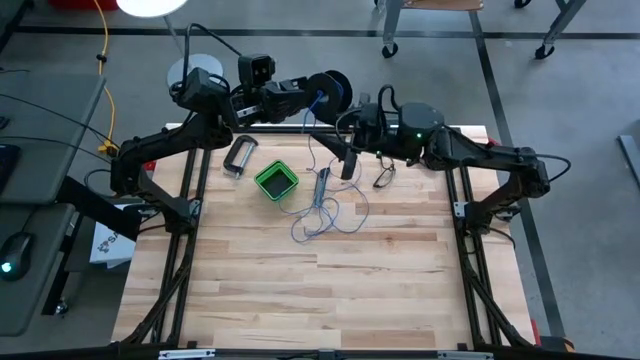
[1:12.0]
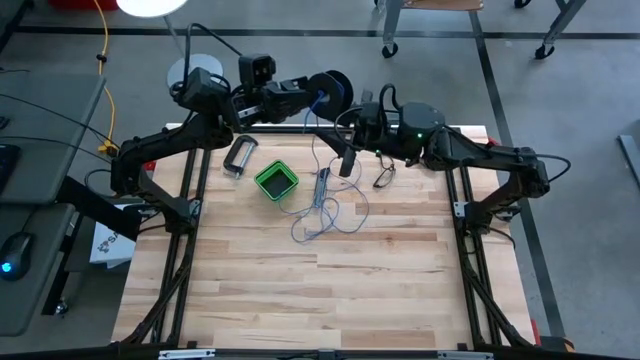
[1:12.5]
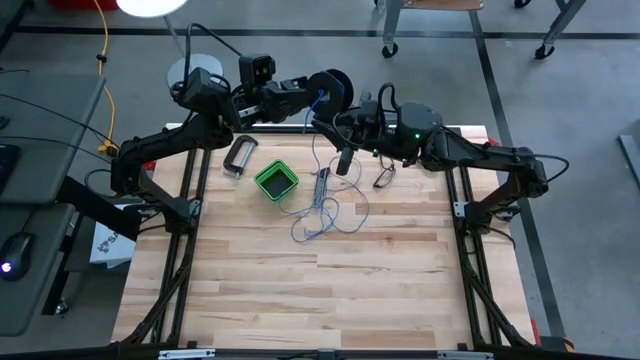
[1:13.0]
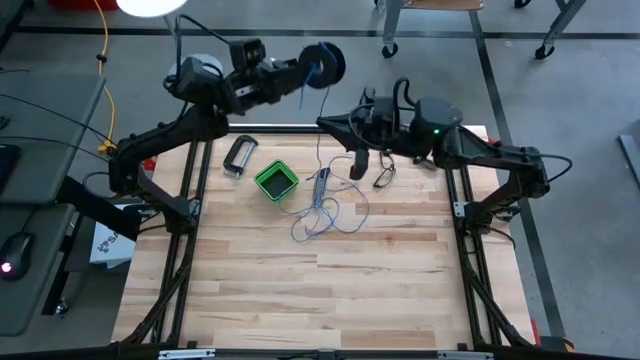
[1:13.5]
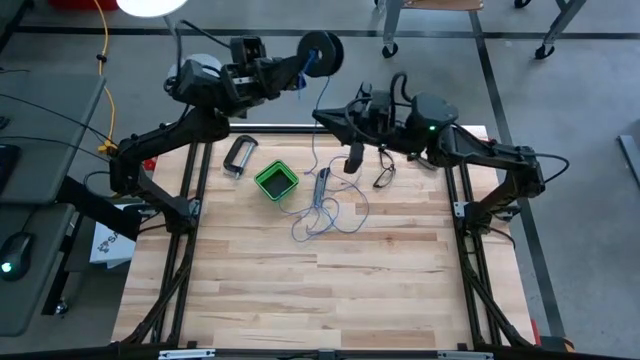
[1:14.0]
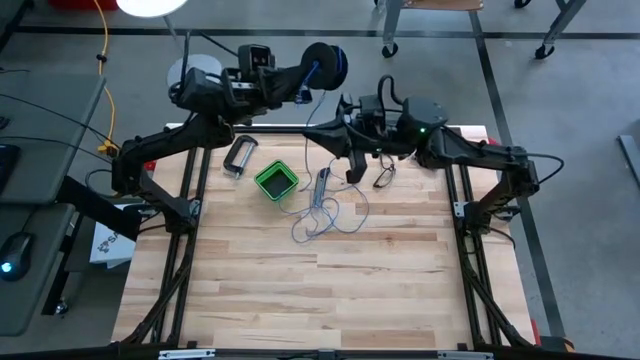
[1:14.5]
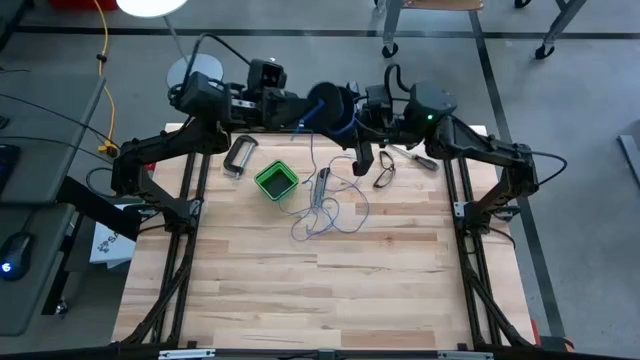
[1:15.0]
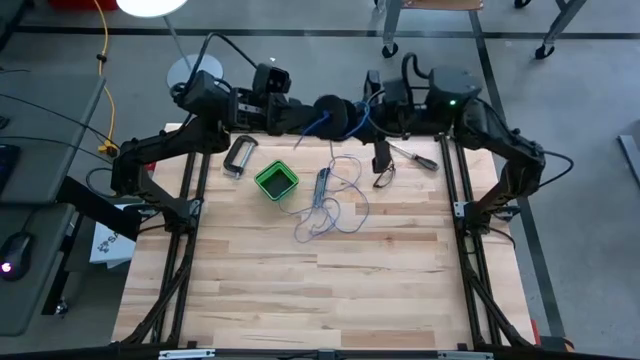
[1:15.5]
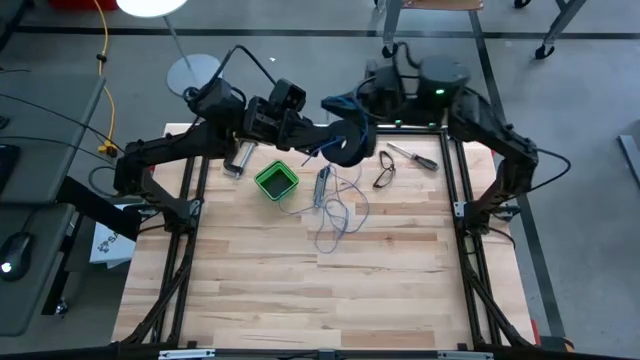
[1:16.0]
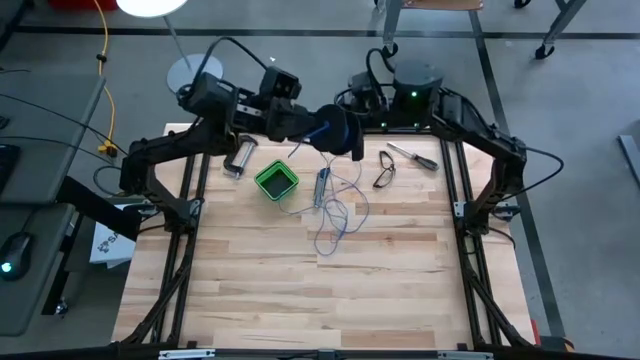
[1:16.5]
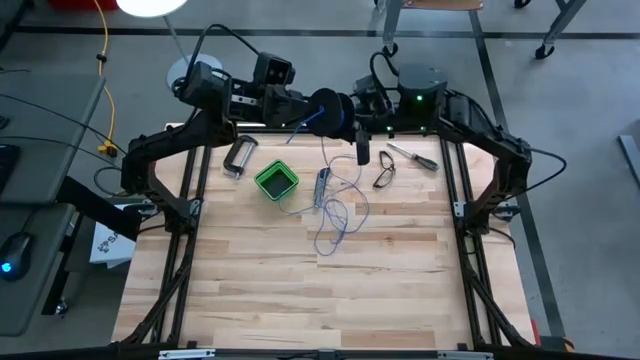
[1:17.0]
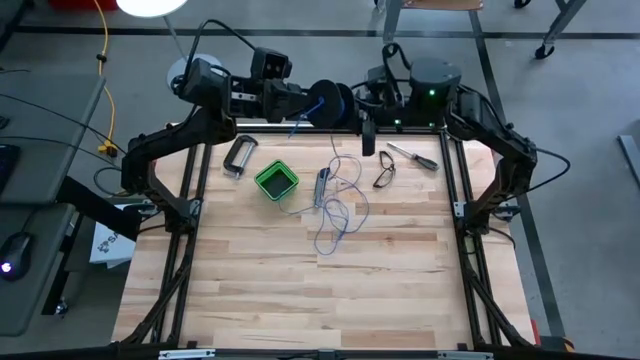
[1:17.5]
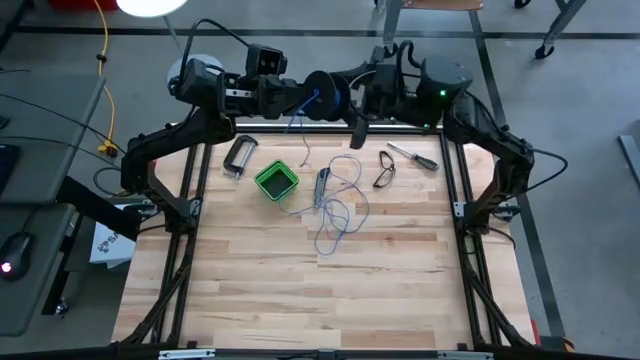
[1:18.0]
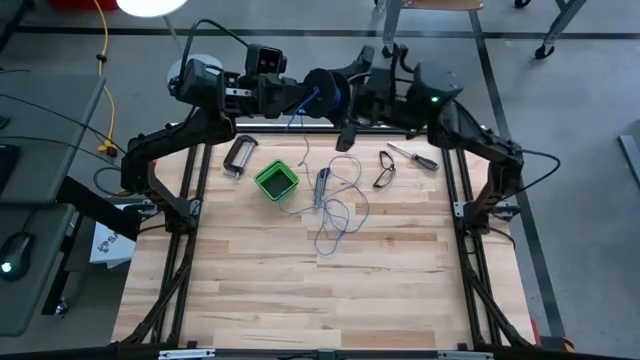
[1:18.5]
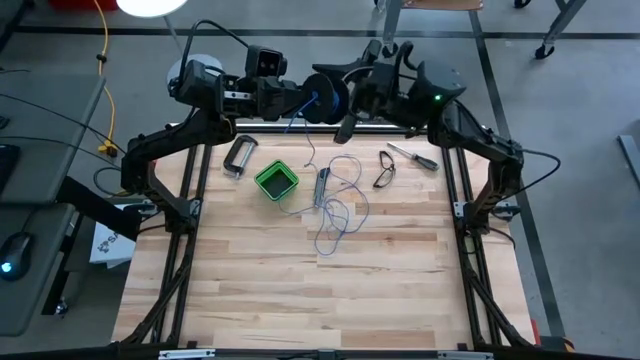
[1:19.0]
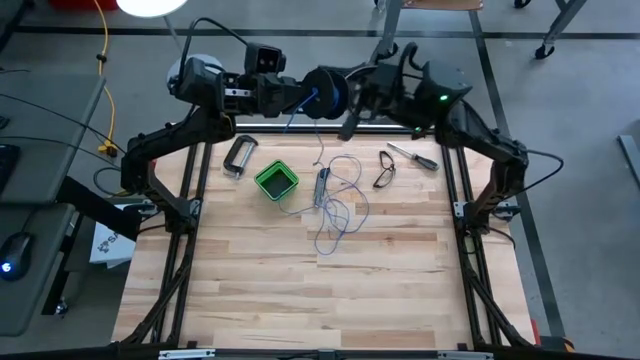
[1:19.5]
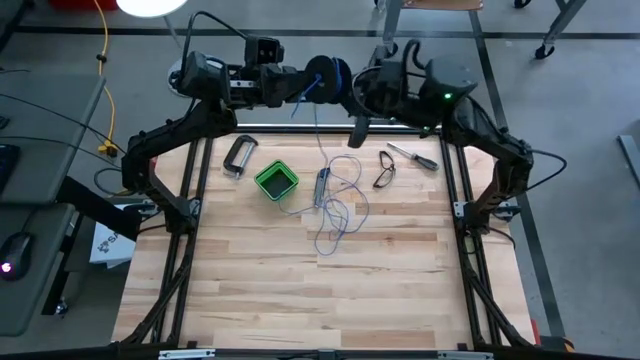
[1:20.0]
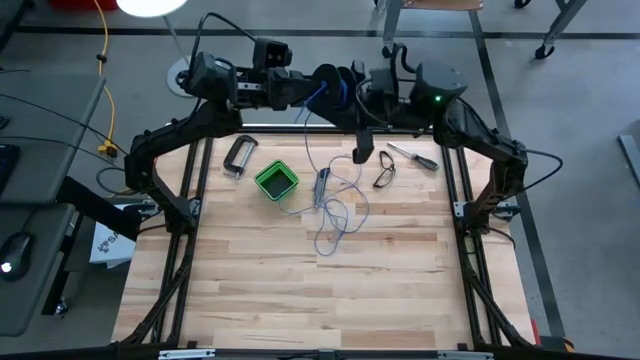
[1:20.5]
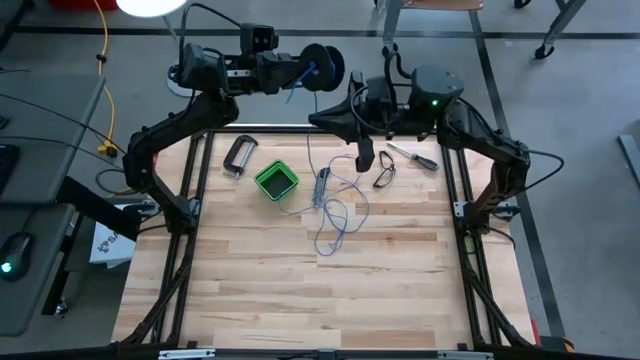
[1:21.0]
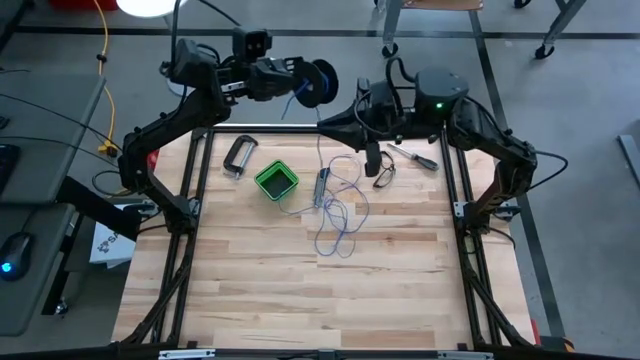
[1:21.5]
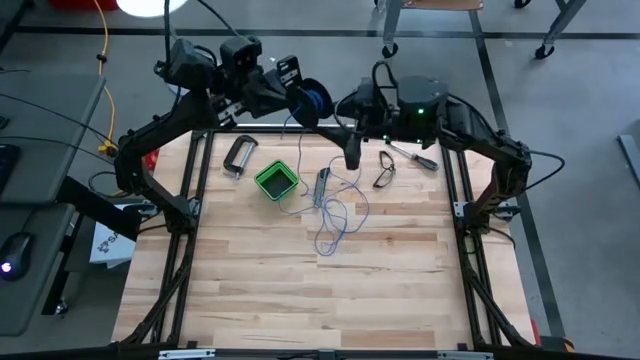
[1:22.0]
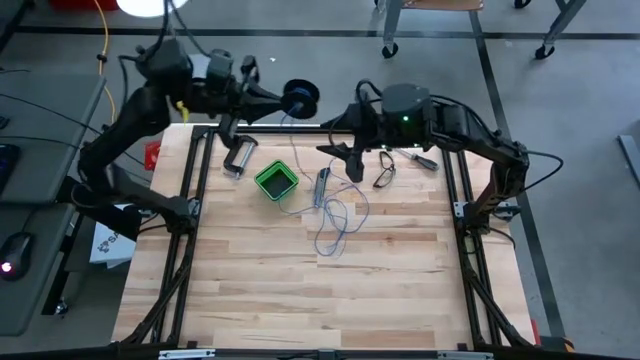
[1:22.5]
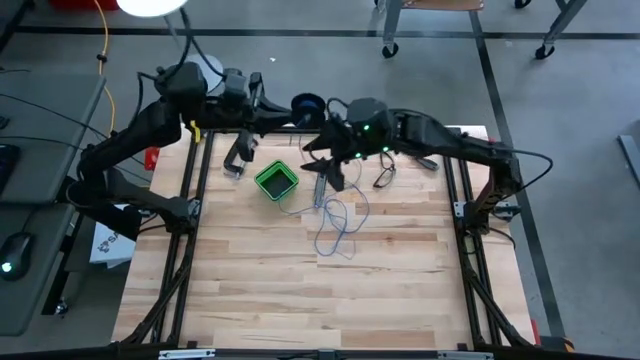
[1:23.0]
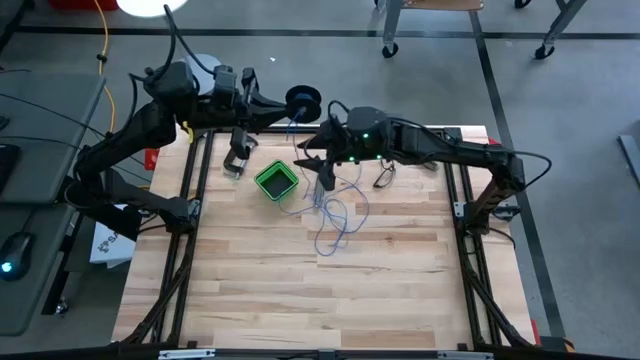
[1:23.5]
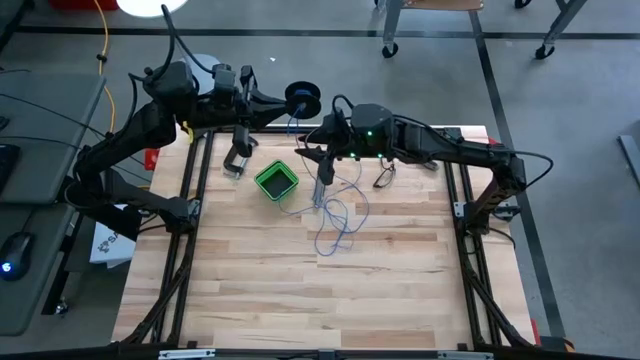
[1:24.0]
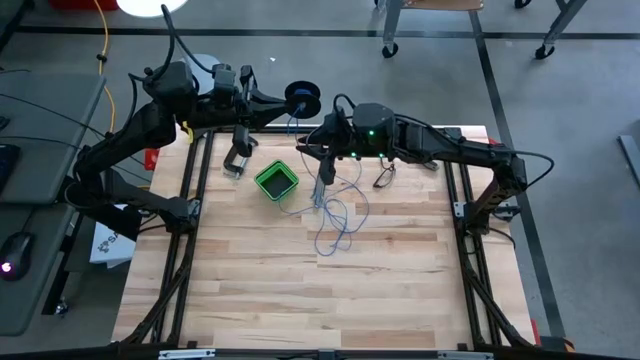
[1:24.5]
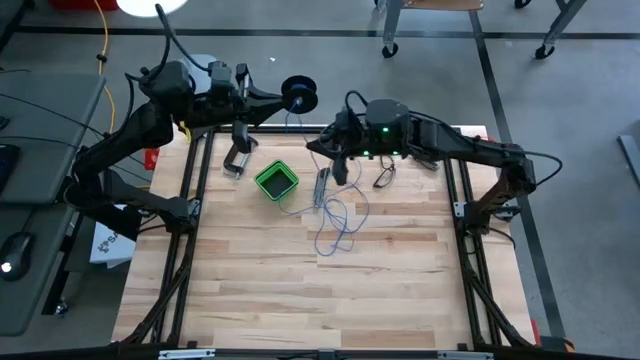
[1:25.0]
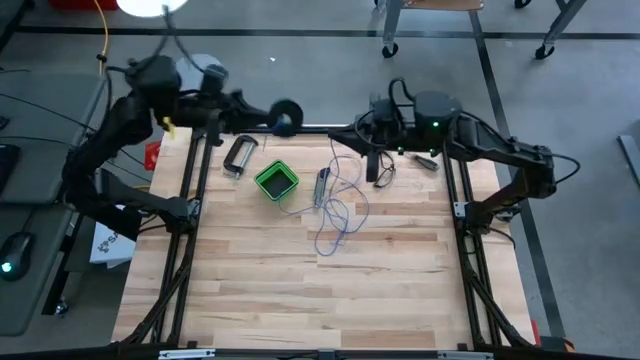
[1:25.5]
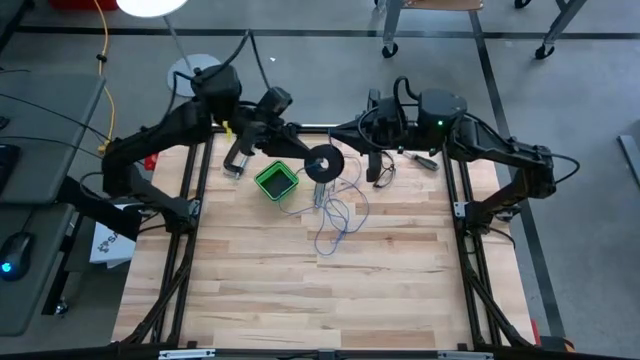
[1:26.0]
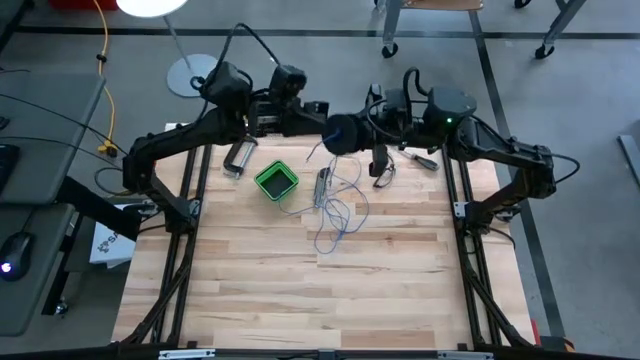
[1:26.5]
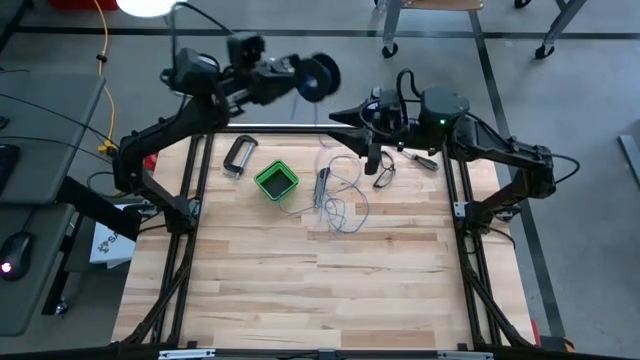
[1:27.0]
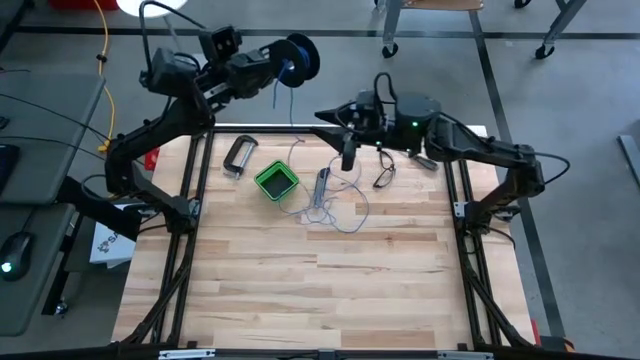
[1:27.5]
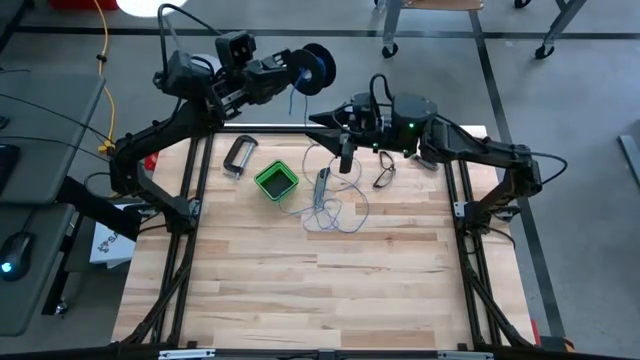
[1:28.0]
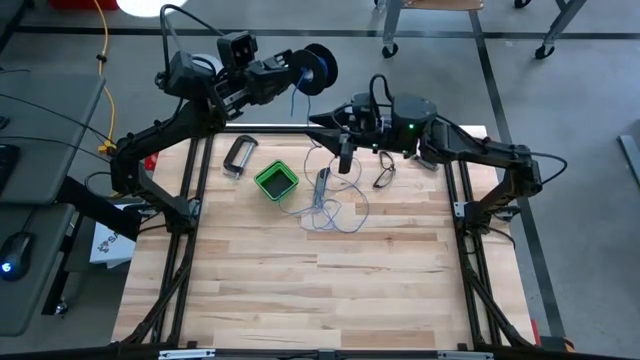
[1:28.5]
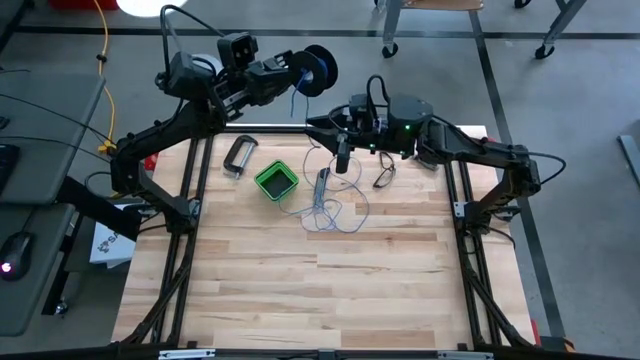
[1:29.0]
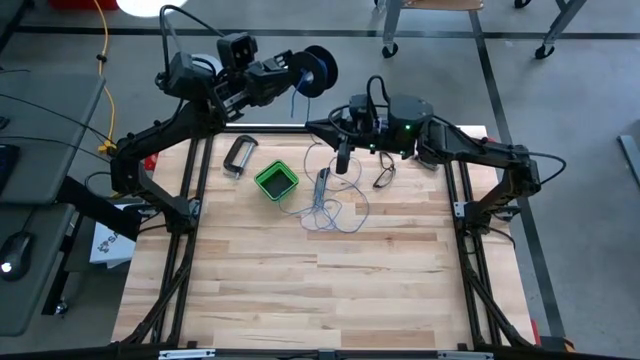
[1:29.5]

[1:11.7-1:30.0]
Task: Coil cords
Coil the blue wire onto the spool

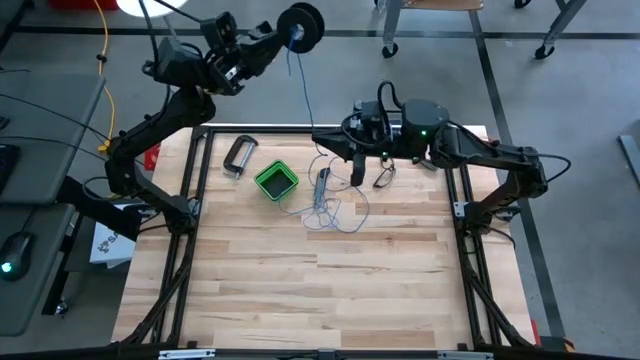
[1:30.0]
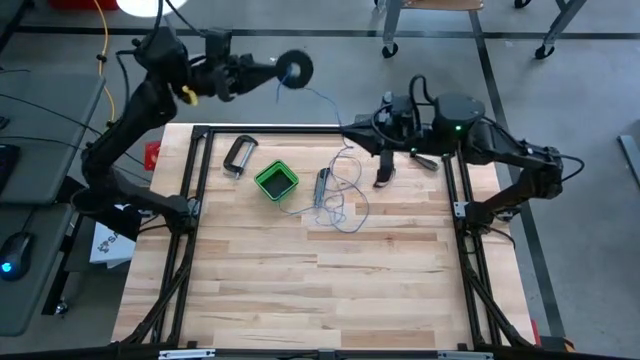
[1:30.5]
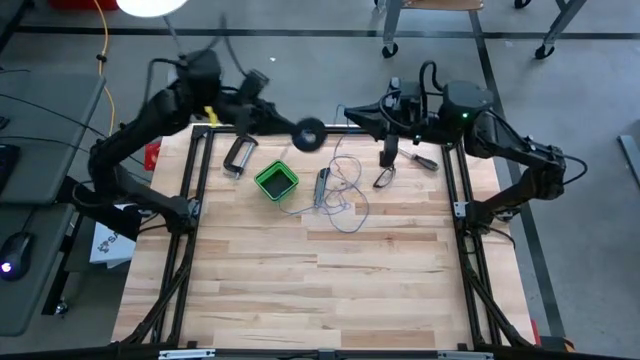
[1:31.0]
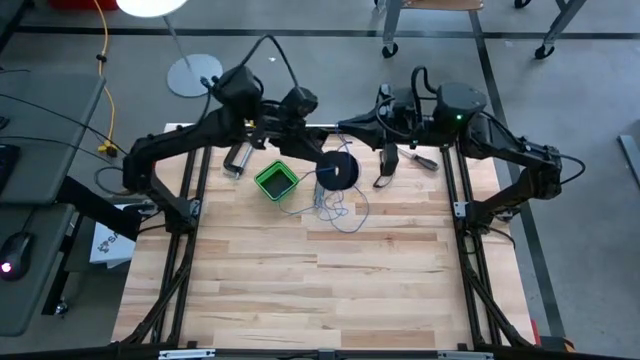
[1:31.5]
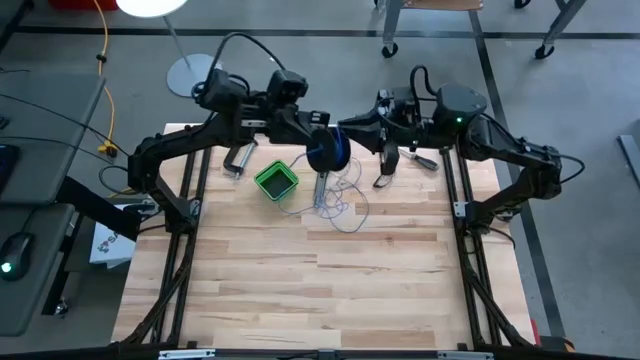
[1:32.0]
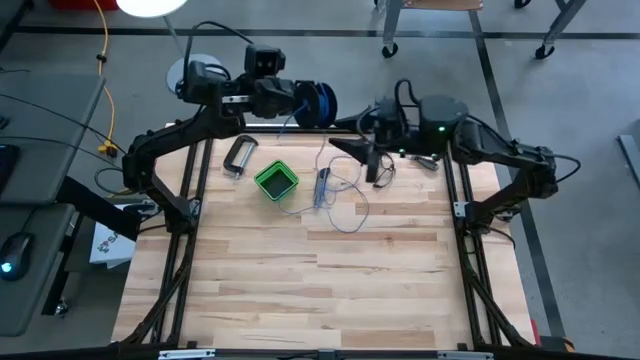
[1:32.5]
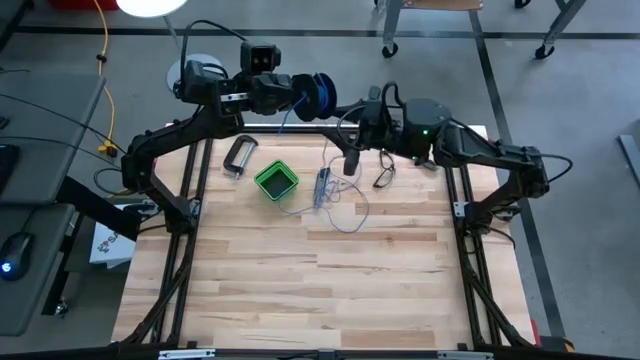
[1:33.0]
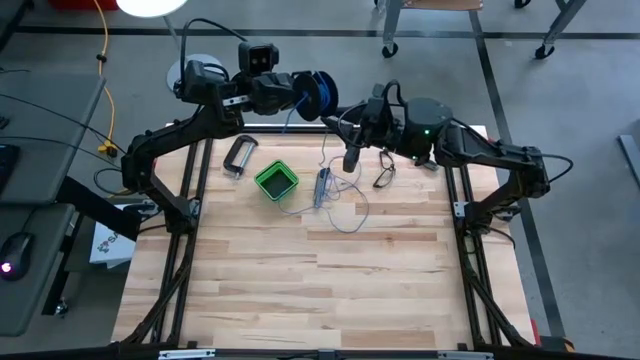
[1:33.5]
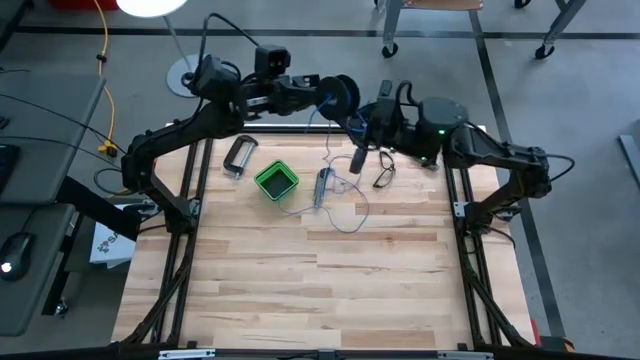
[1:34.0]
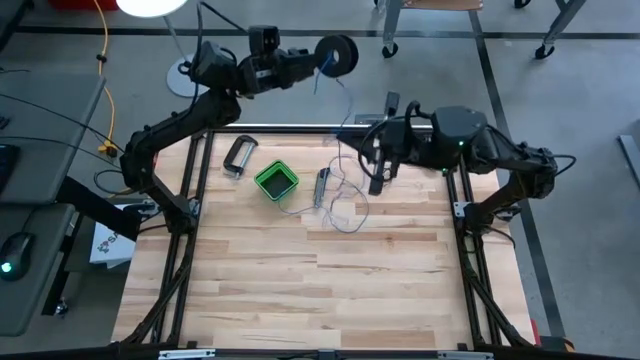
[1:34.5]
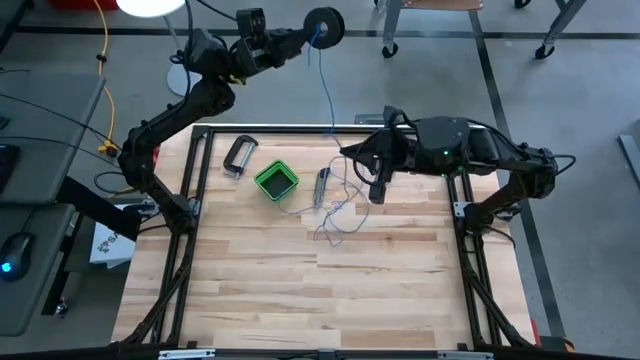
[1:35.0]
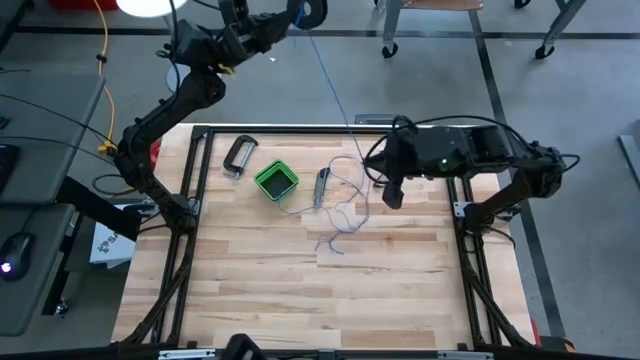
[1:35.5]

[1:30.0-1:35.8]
Coil the blue wire onto the spool
